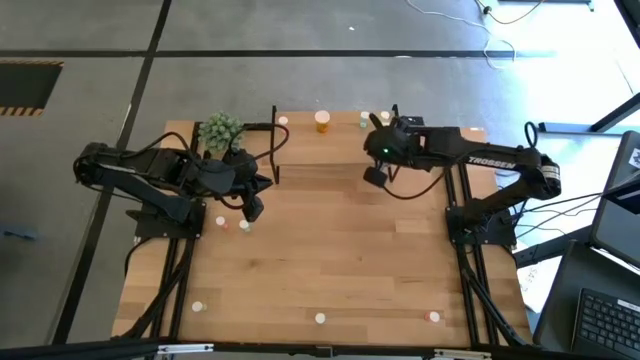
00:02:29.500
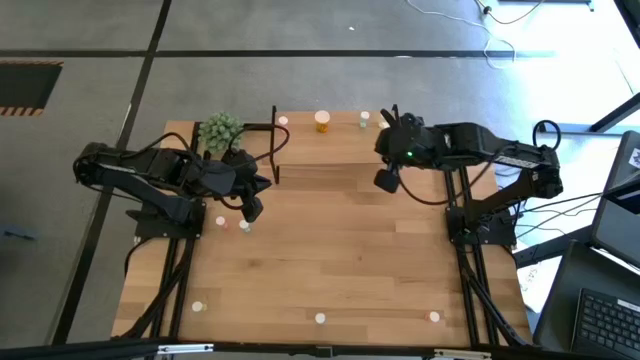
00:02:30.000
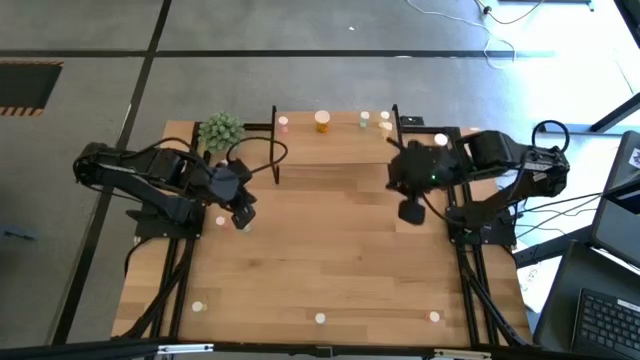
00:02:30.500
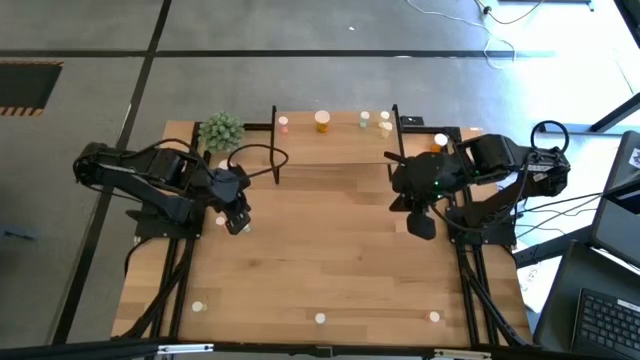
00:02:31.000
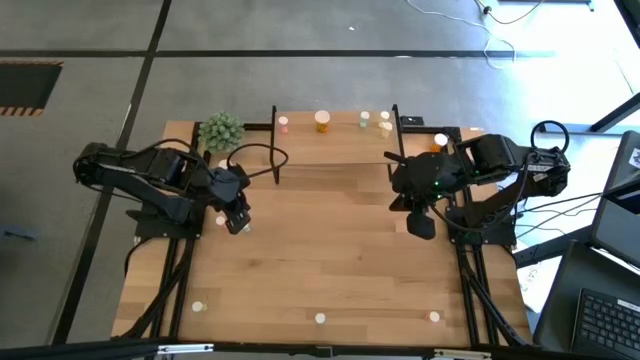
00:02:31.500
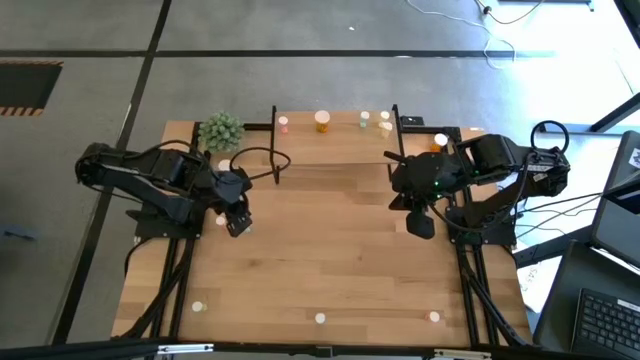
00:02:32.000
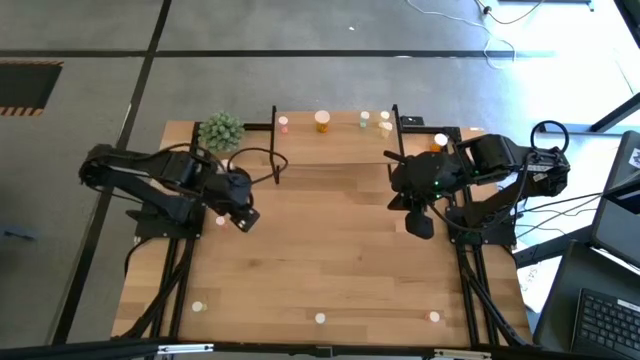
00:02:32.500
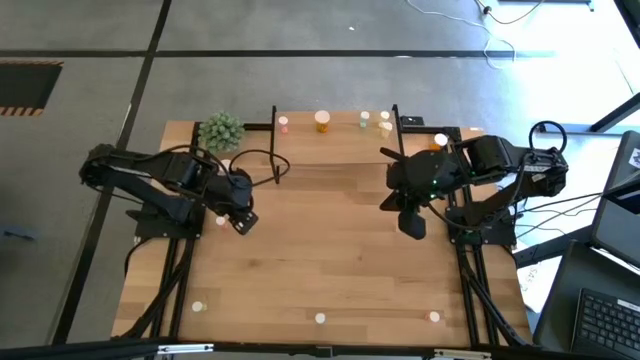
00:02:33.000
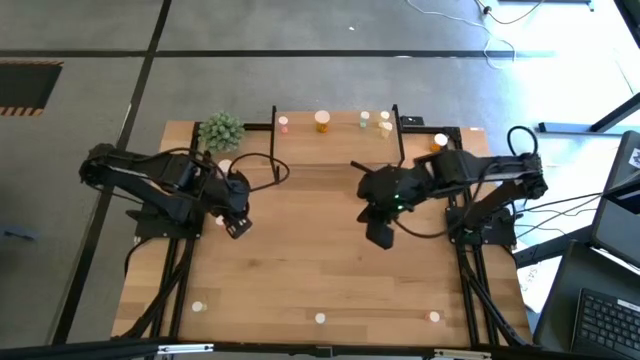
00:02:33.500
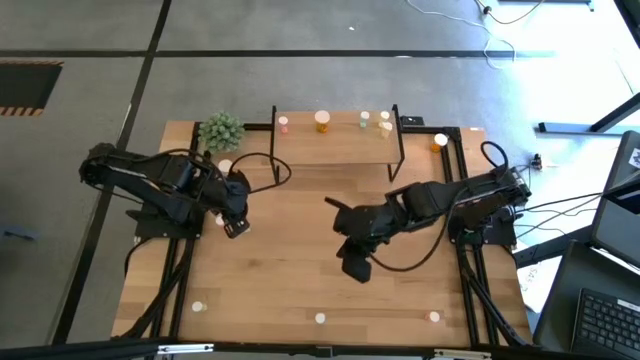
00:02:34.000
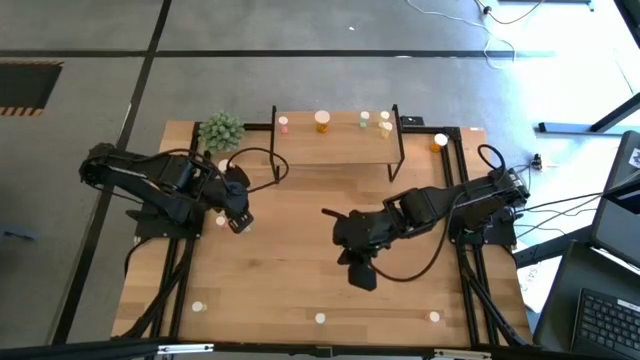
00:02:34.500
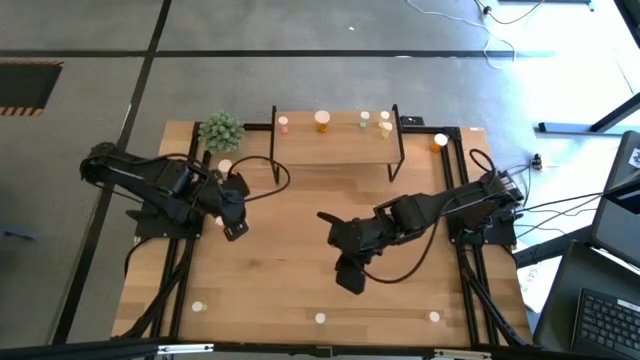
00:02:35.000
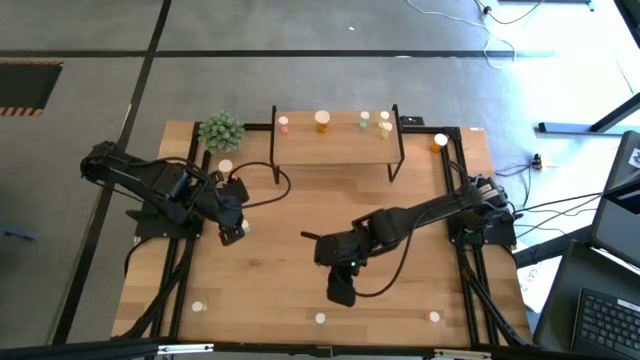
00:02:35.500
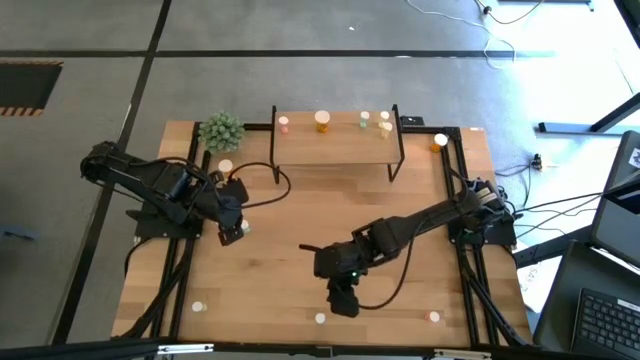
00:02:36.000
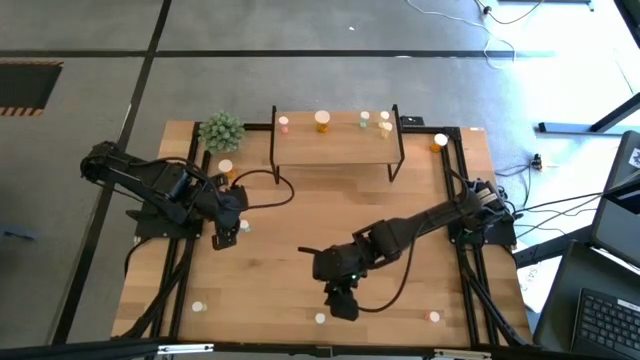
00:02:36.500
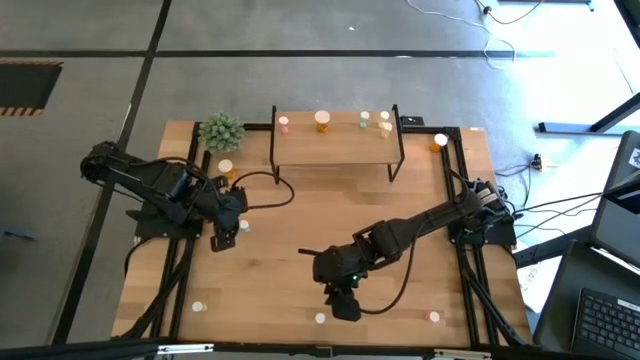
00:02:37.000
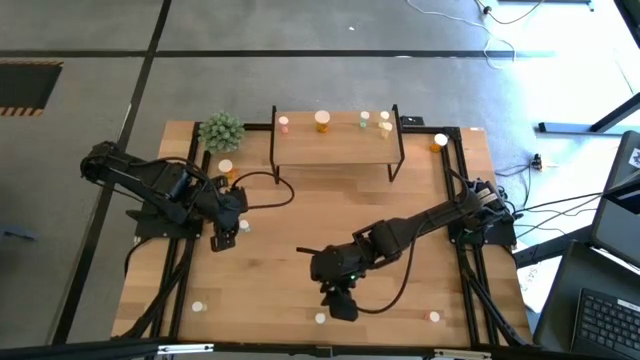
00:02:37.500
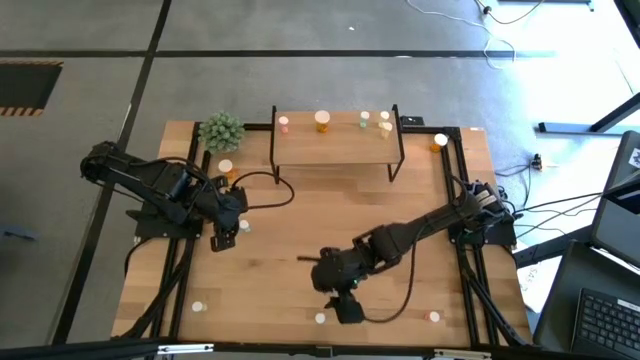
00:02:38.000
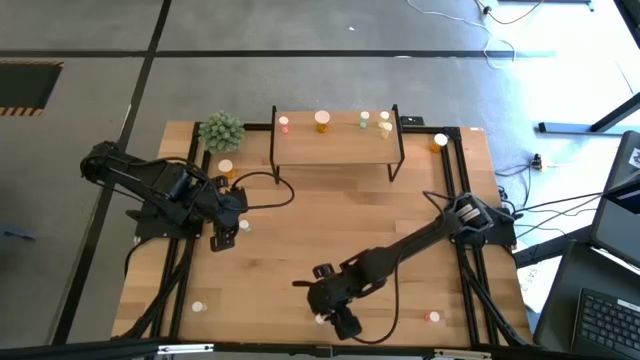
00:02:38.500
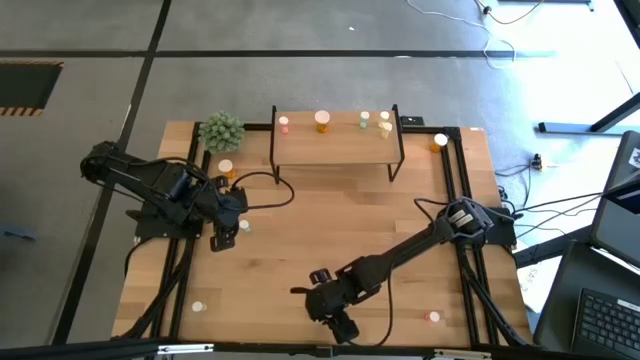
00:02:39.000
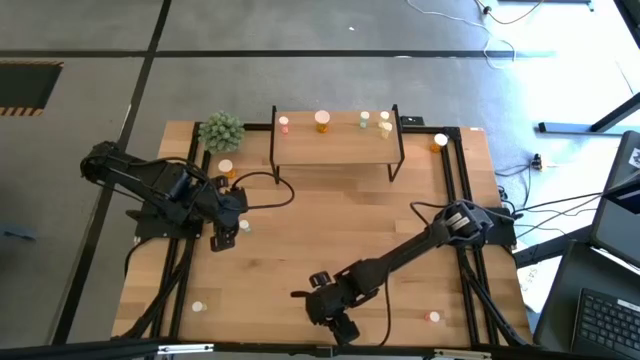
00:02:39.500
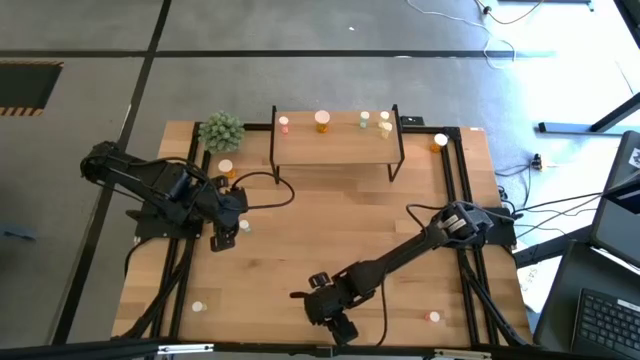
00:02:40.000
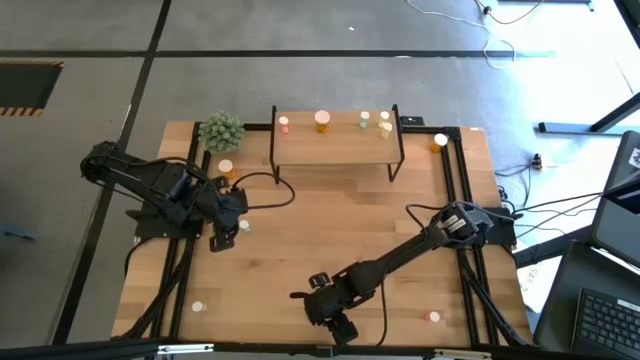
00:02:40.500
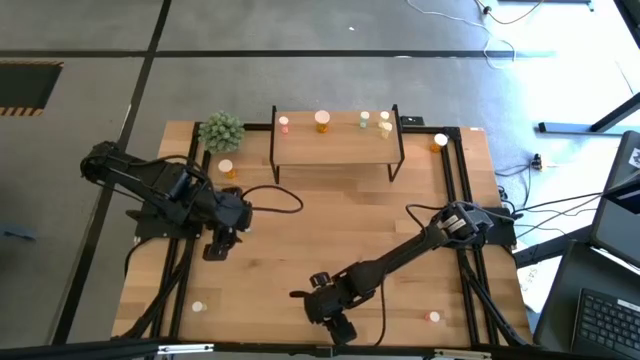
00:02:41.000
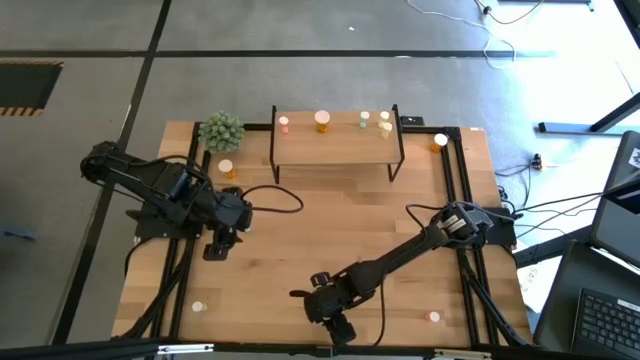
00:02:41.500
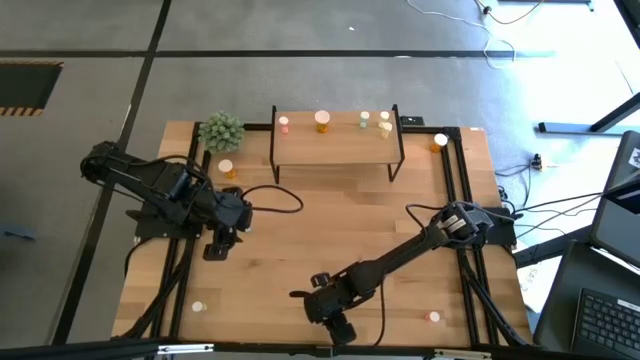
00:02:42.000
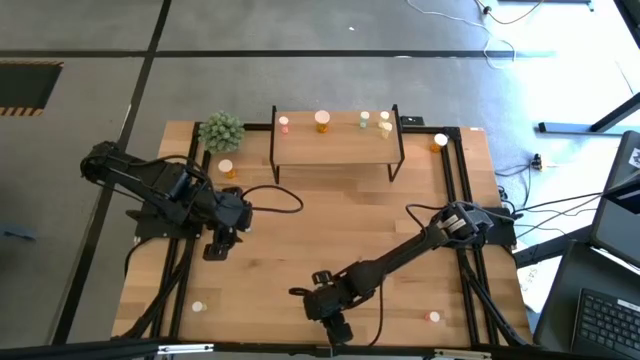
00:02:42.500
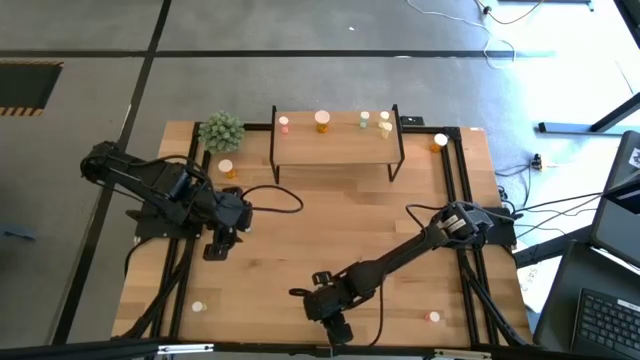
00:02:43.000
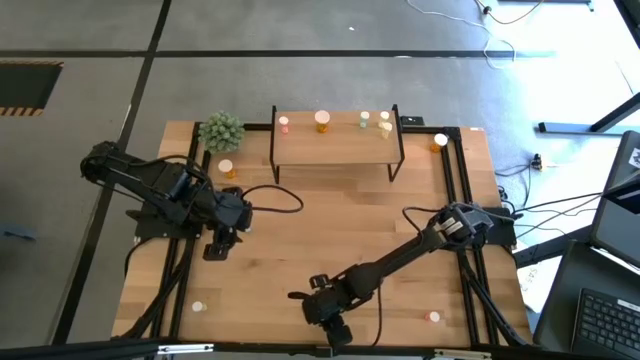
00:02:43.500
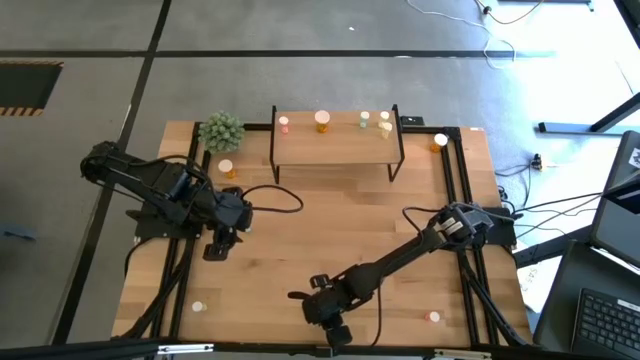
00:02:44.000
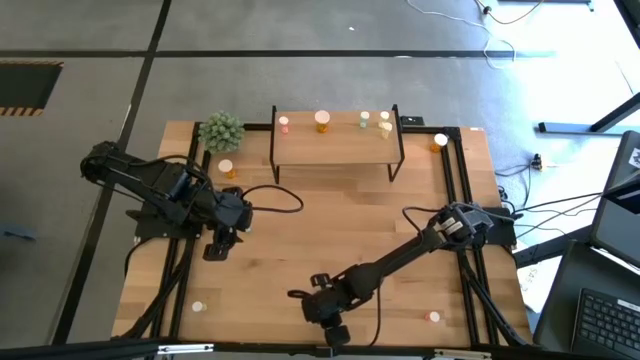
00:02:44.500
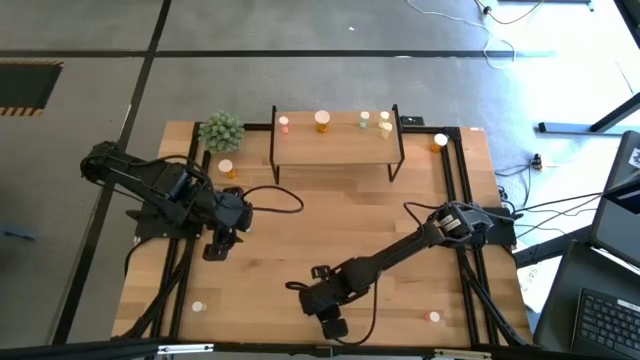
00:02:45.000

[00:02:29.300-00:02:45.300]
Task: Pick and place medicine bottles onto shelf by color
Put the bottom blue medicine bottle on the shelf

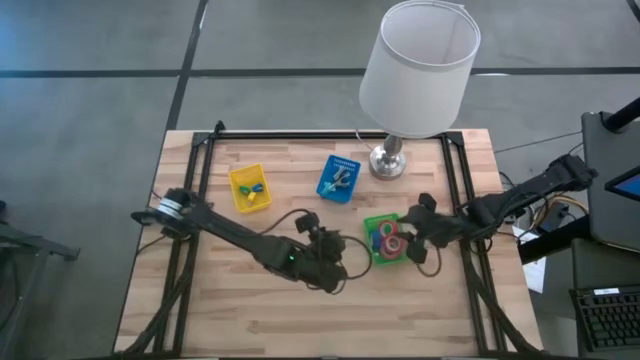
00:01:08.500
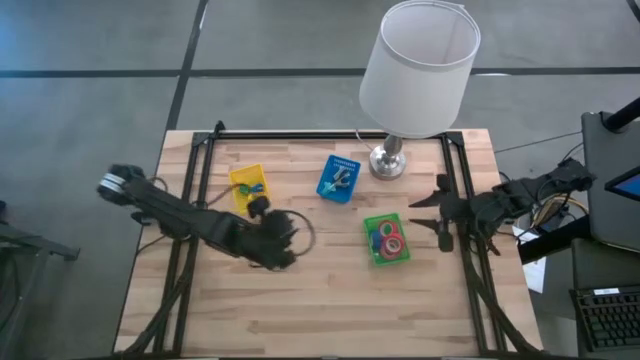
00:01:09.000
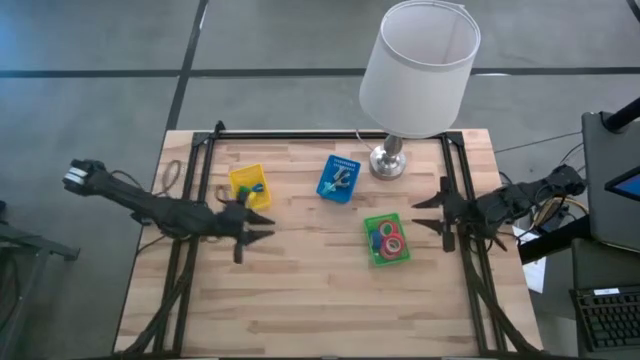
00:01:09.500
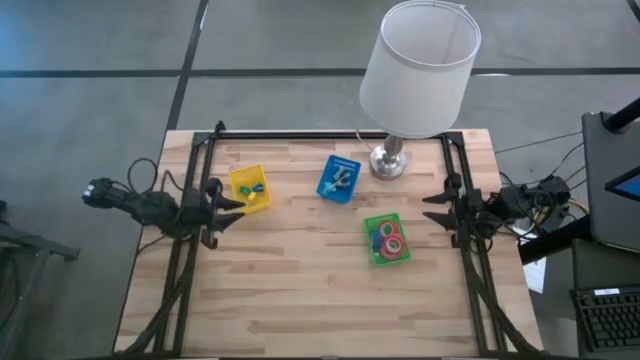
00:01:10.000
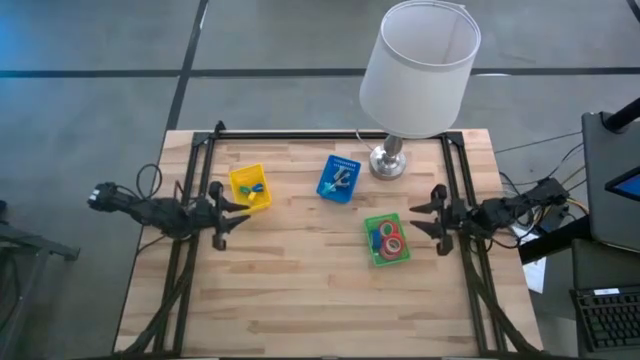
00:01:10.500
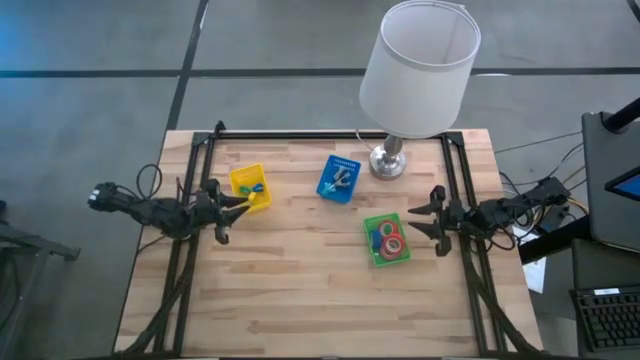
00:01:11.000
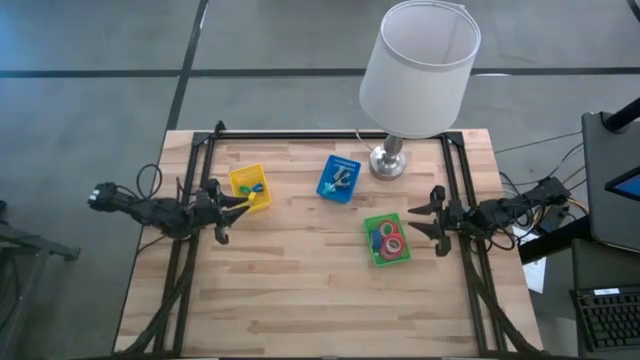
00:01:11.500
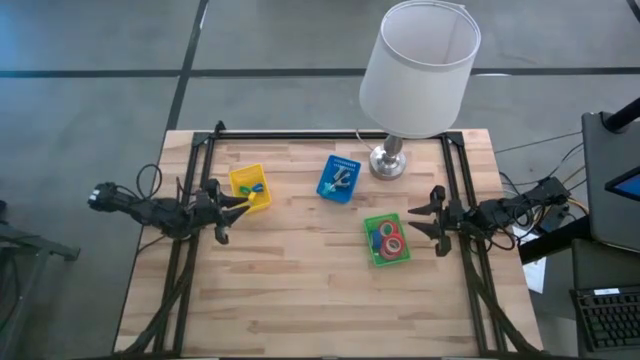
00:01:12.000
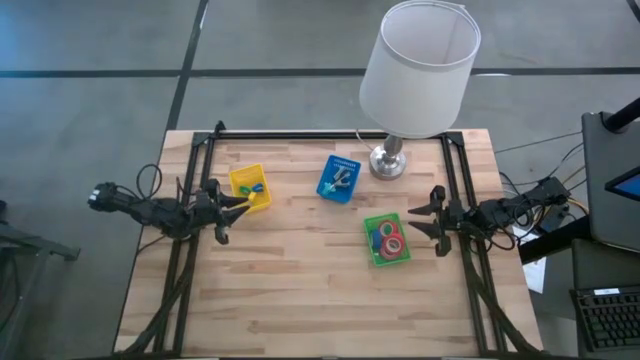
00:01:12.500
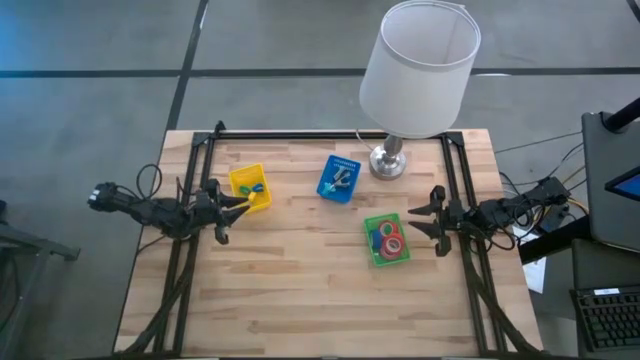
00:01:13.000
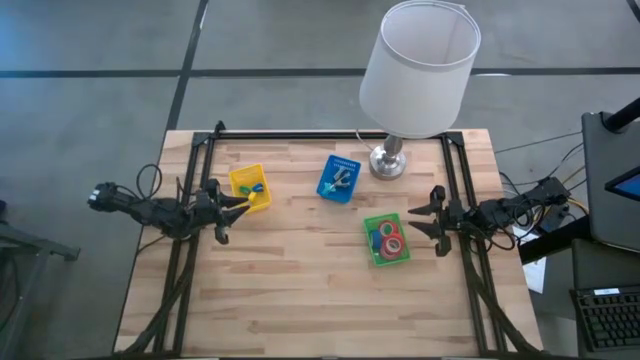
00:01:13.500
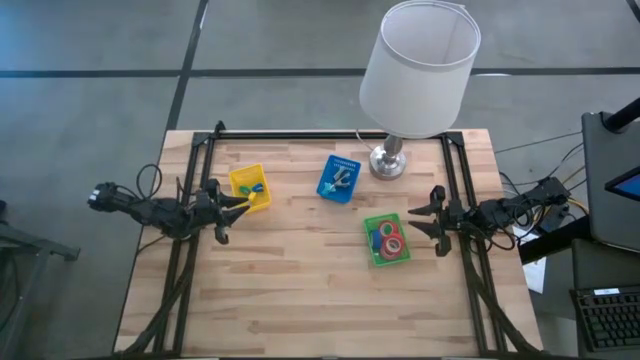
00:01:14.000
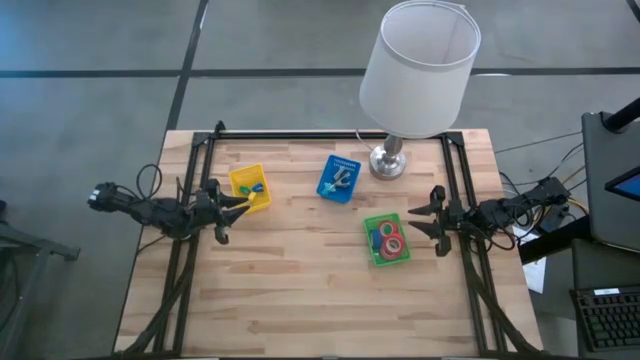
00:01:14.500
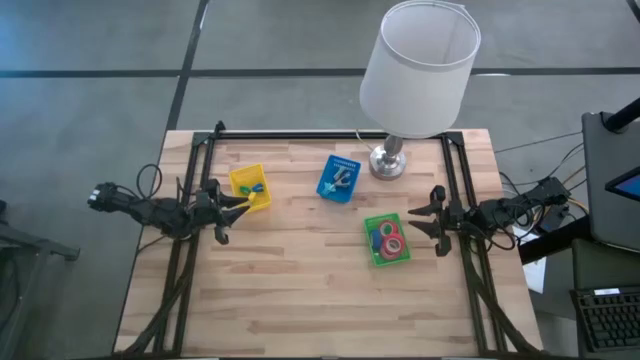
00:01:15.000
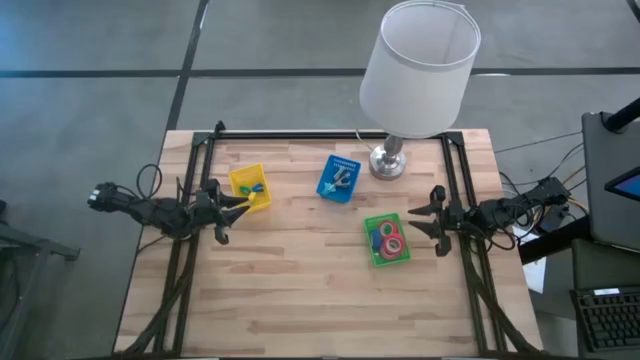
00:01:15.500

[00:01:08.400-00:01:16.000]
Task: Pick and place Stapler, Stapler remover, tape
Return to Home Position
